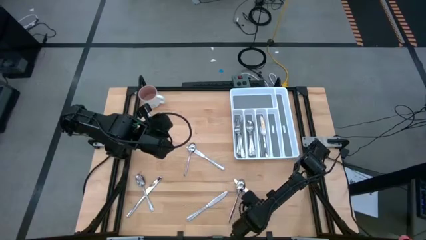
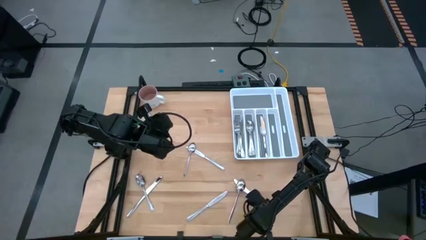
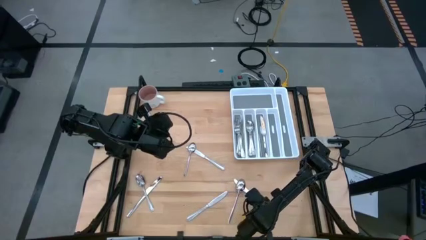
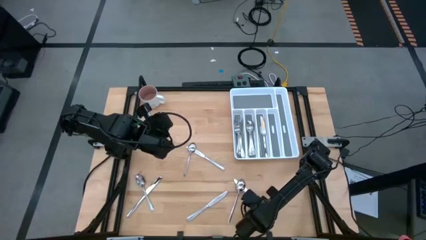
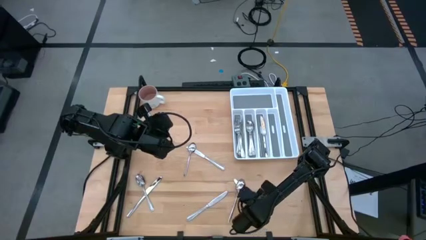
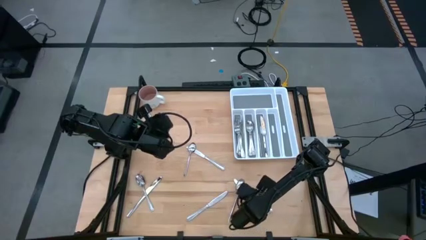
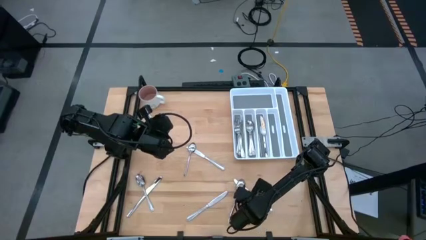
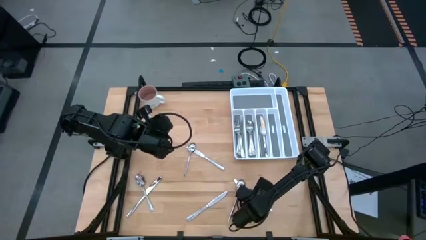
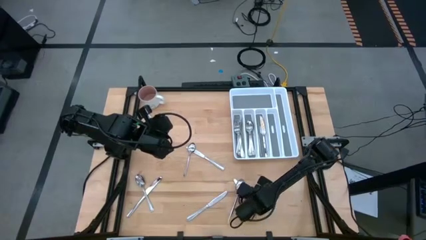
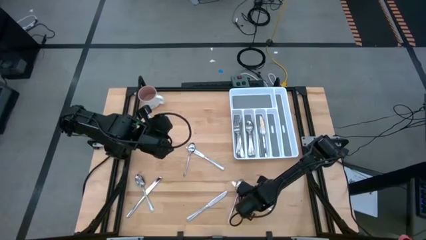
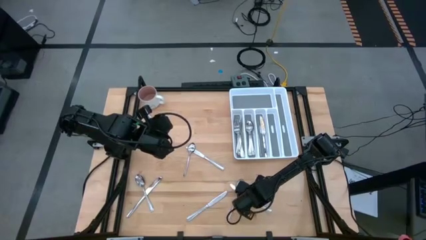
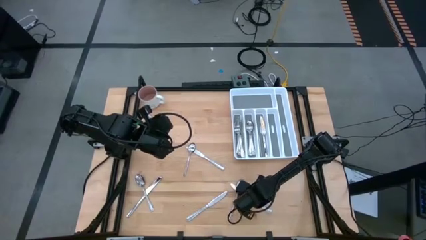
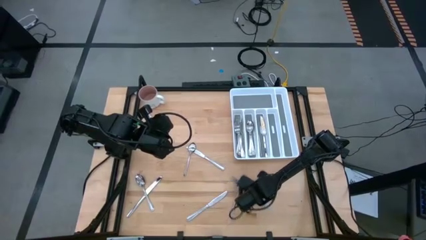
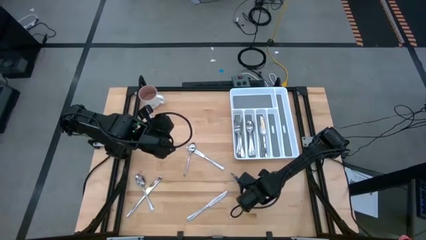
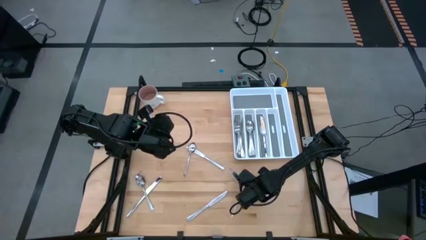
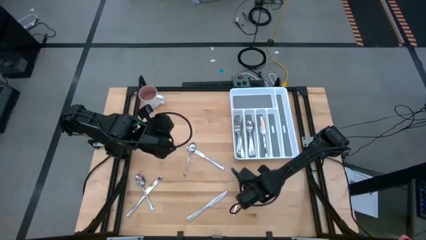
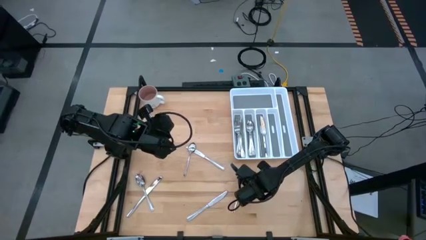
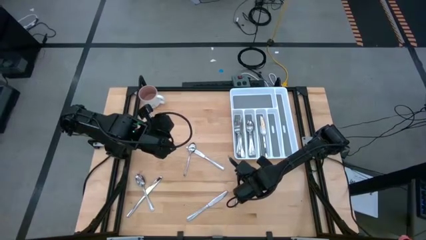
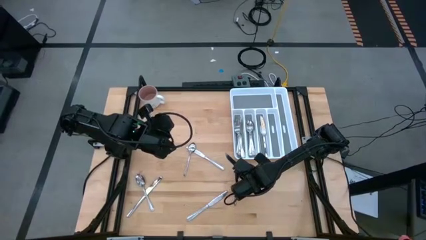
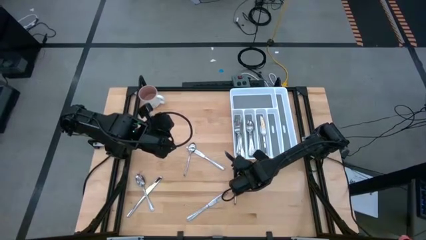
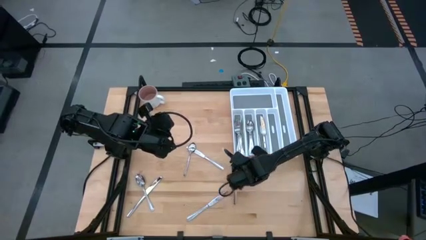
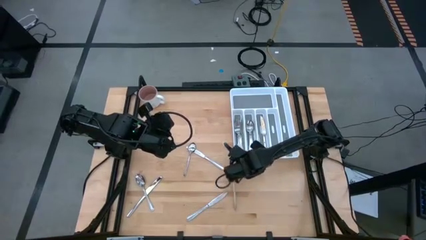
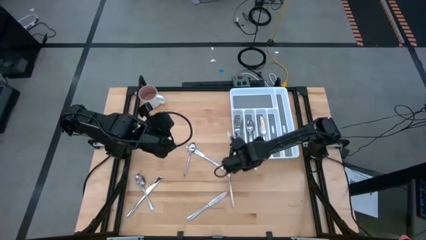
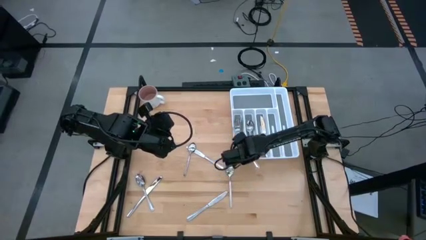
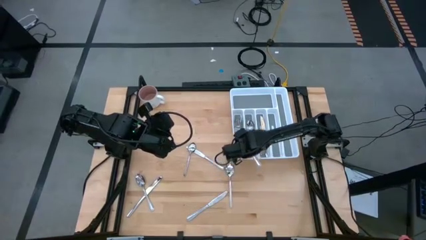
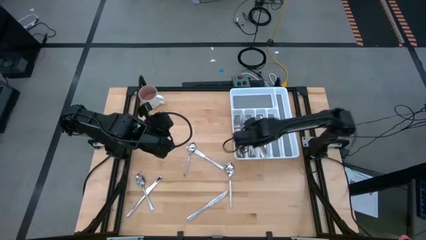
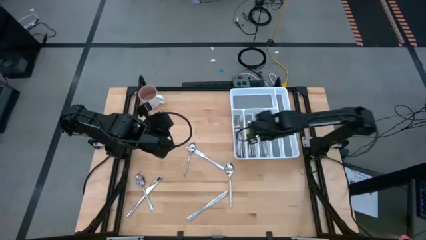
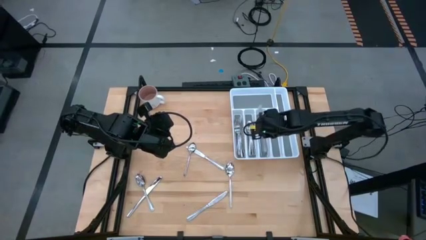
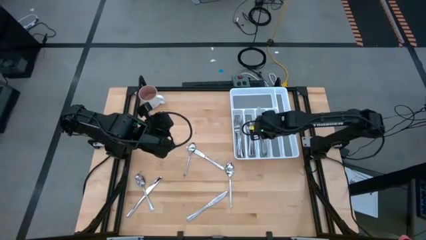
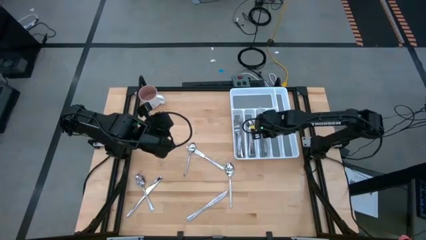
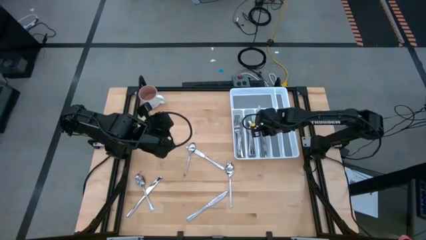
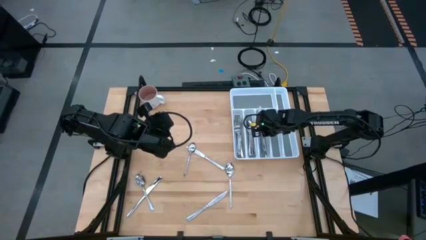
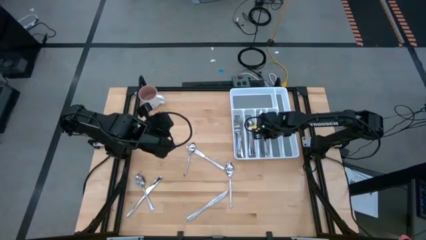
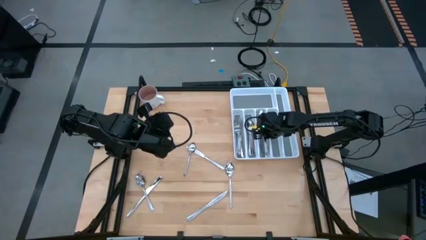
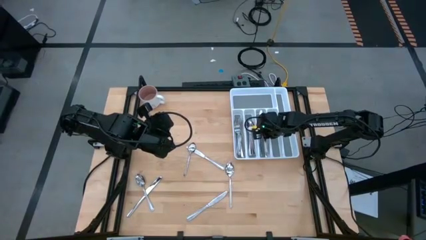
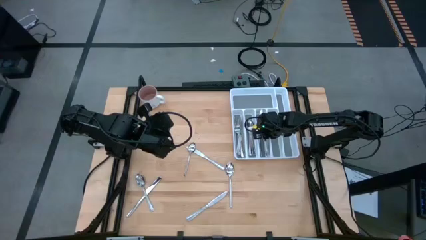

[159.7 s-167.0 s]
Task: Sort silverware
Put the silver table knife into the silverware tray

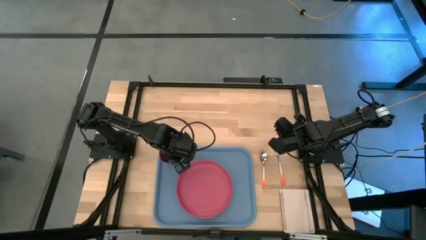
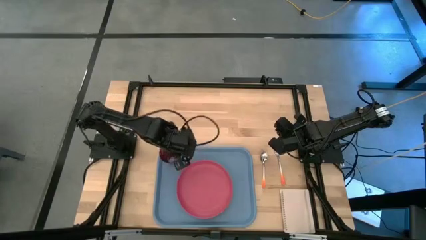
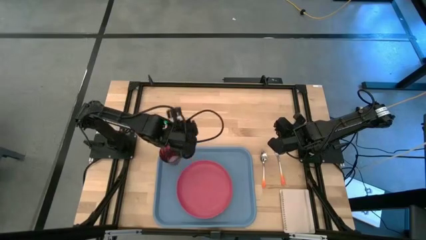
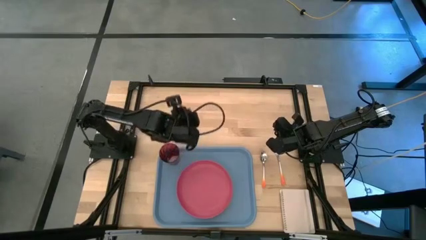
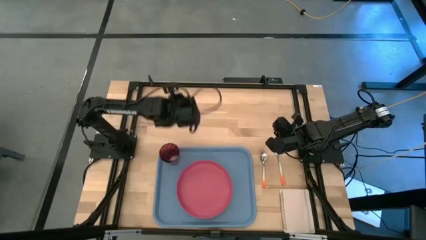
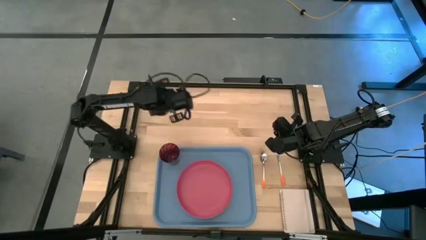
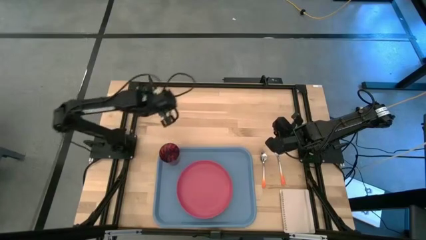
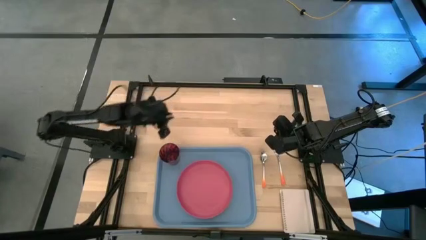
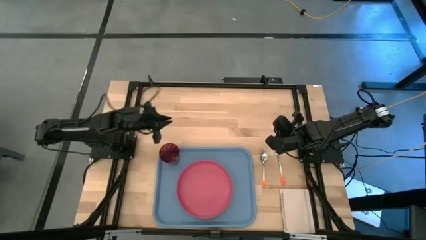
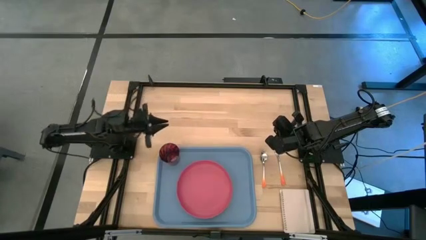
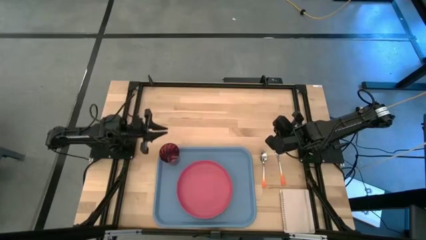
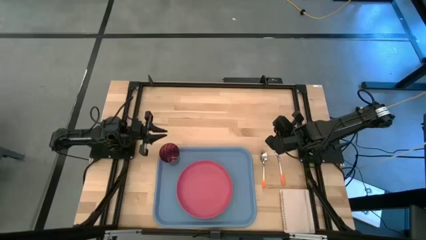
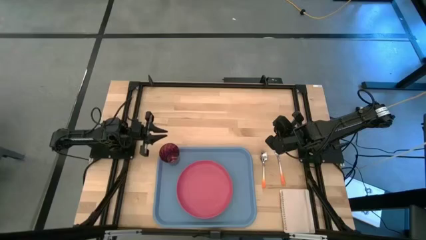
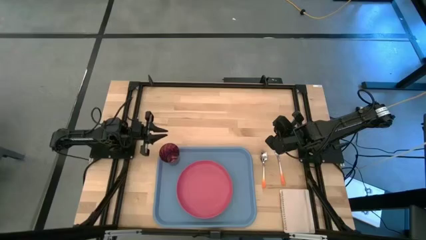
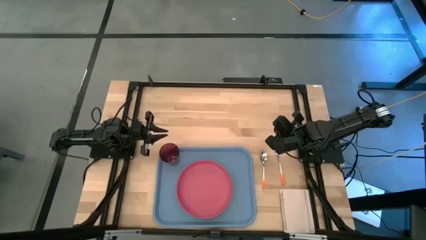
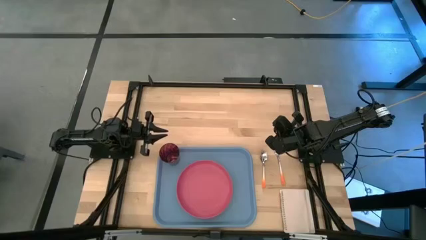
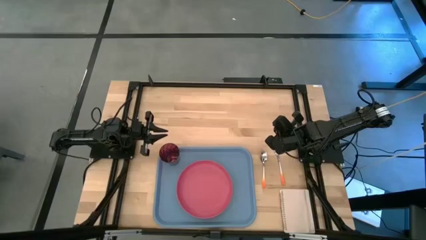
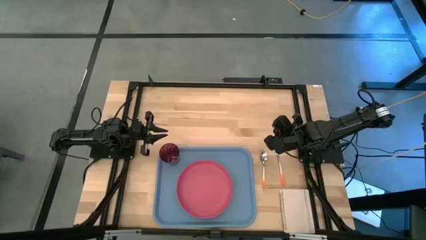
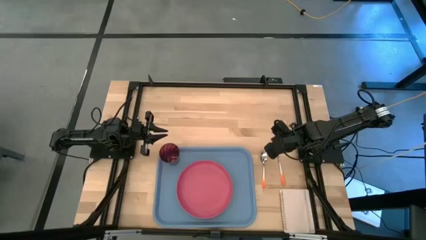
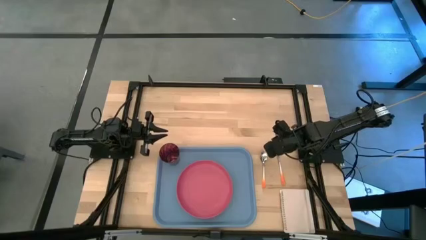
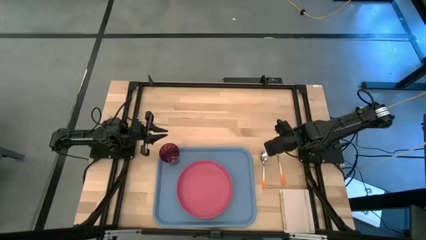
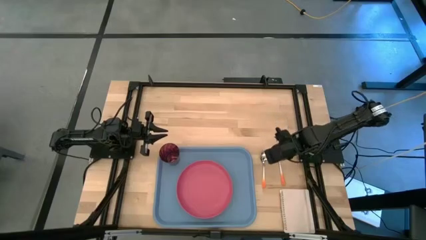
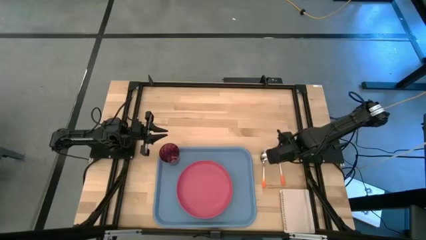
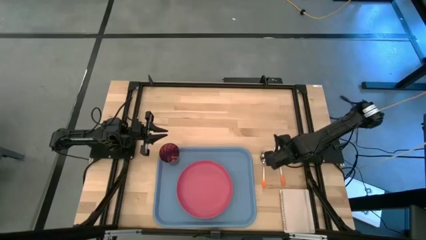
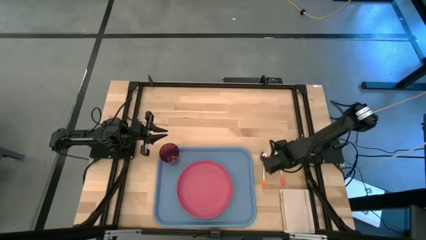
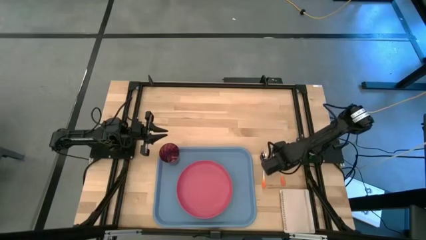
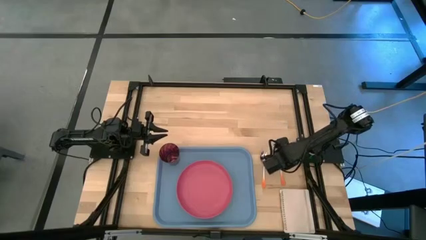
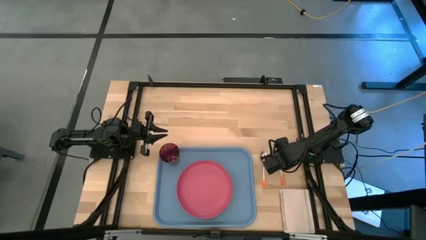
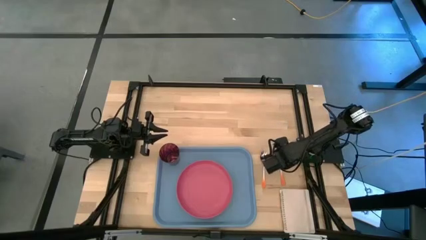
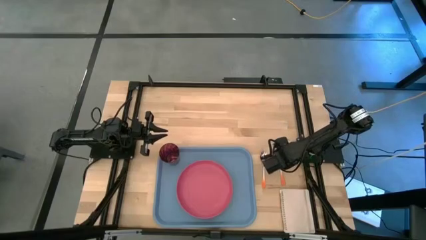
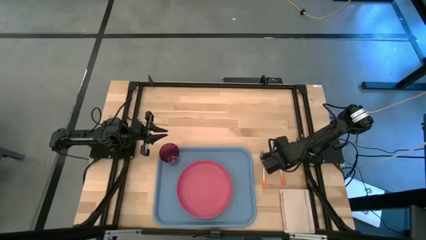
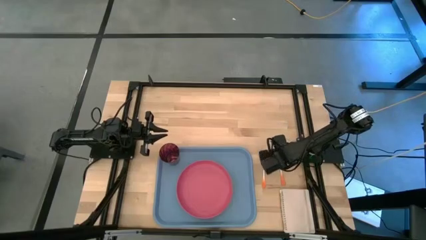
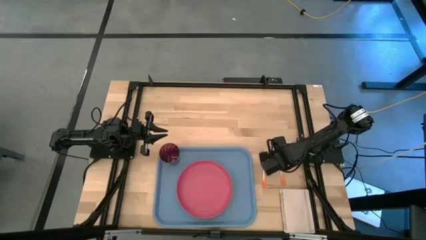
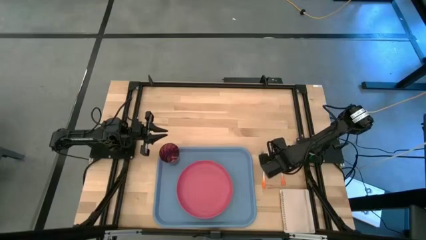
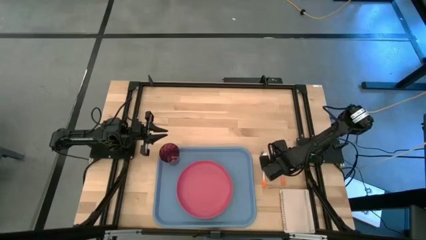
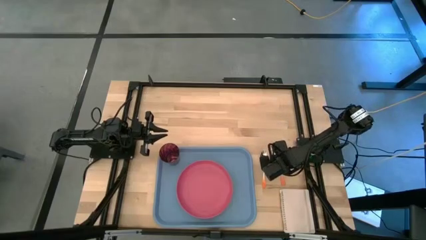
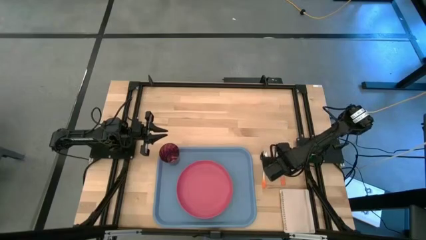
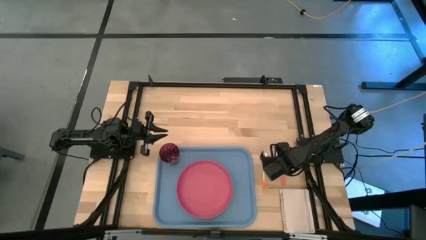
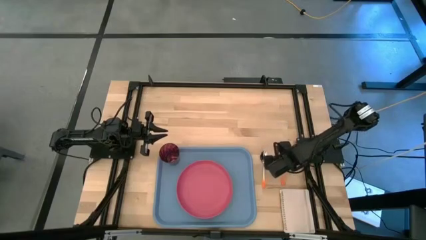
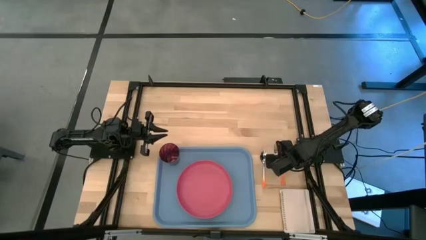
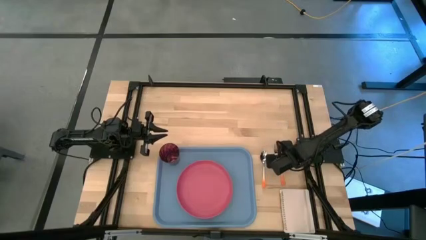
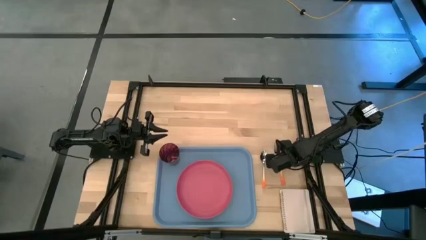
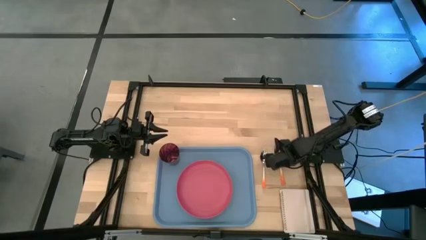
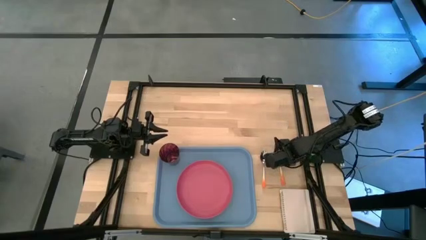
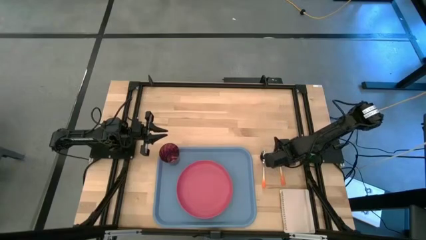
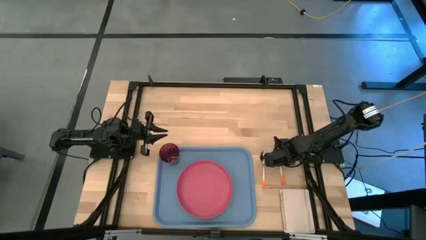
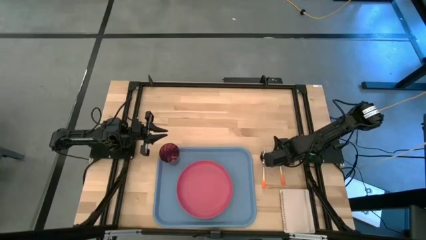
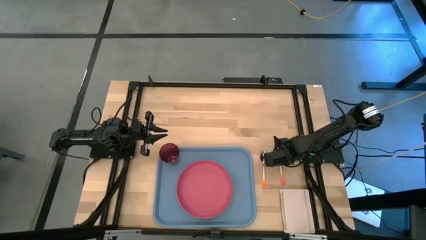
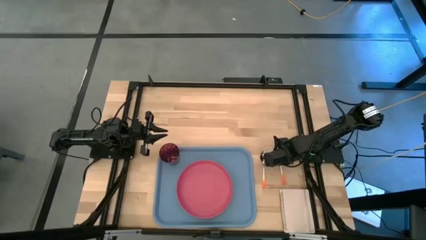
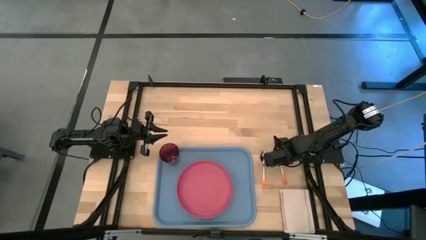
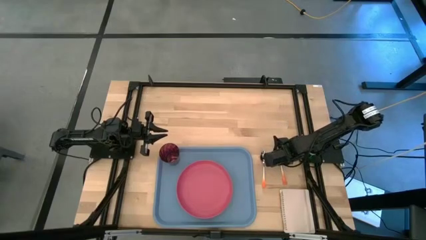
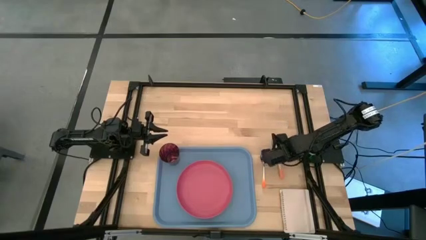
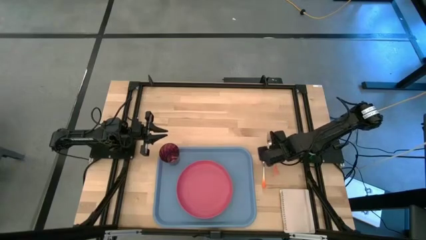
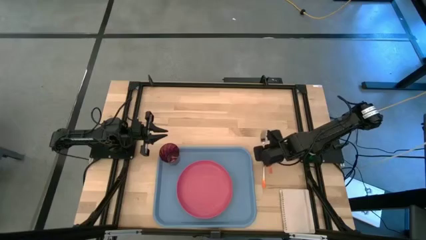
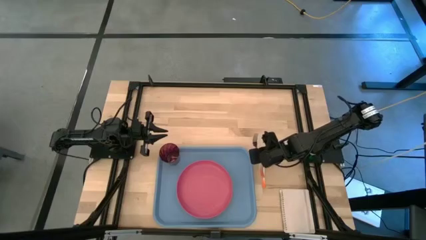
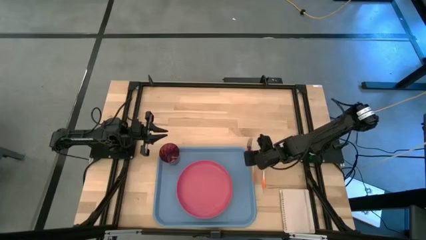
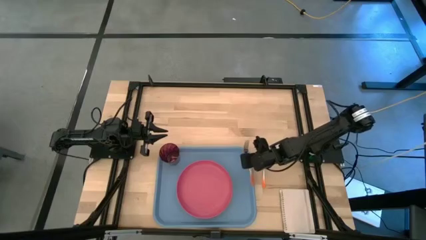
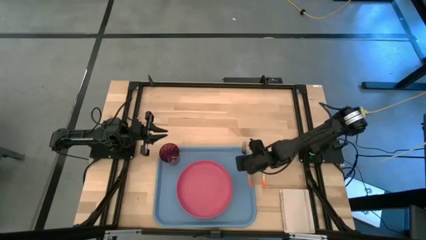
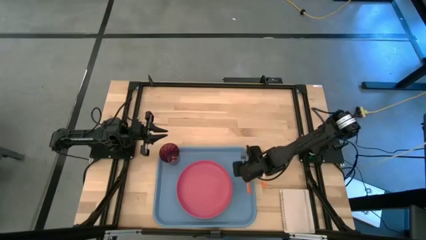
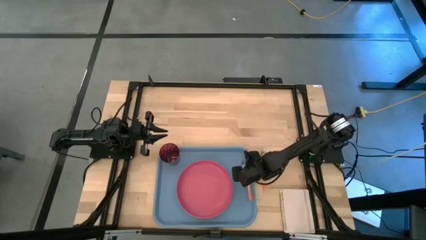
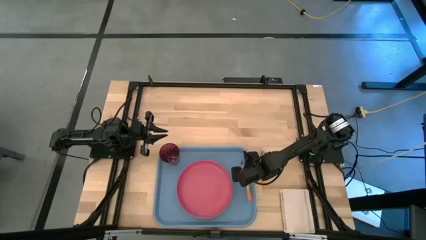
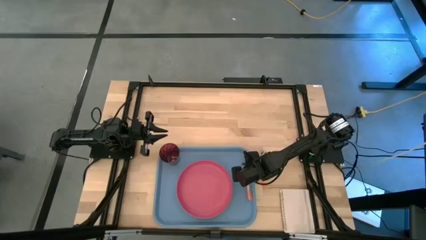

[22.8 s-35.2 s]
Task: Pick and place plate/cup/fork/spoon on tray
Put the orange fork on the serving tray to the right of the pink plate
